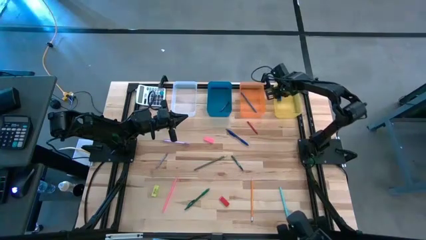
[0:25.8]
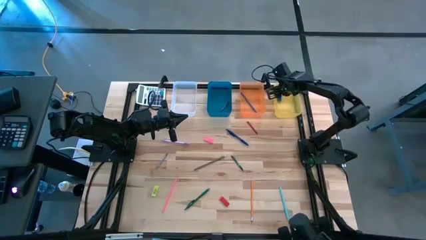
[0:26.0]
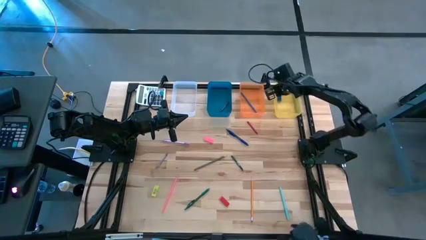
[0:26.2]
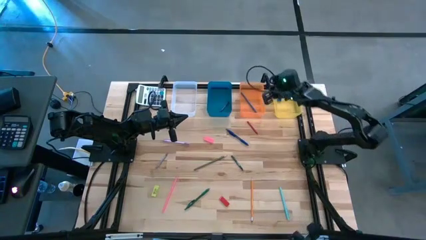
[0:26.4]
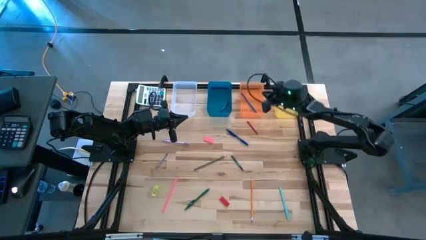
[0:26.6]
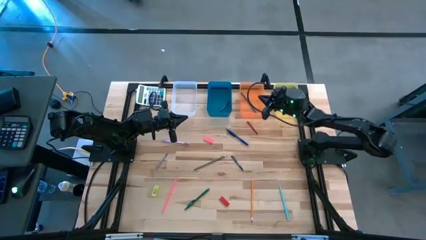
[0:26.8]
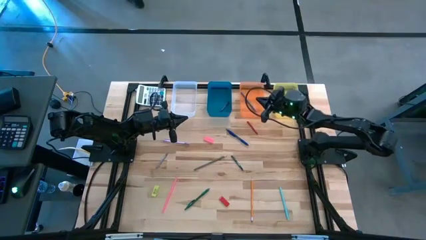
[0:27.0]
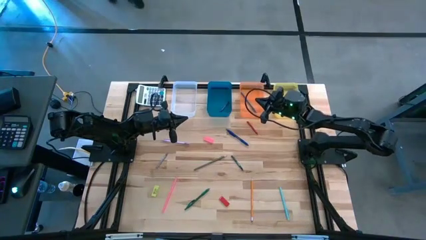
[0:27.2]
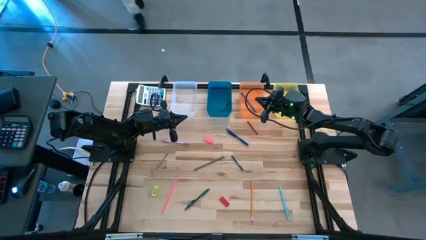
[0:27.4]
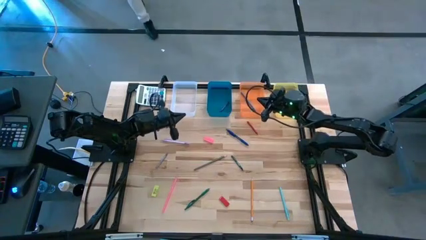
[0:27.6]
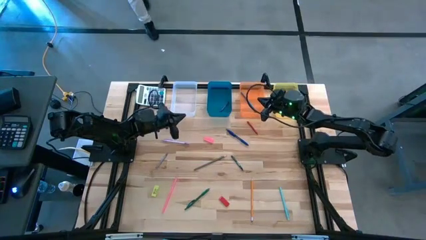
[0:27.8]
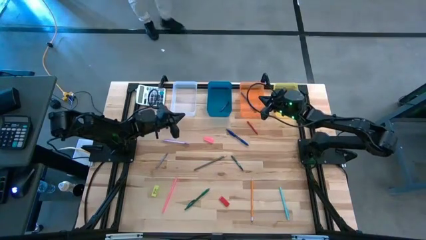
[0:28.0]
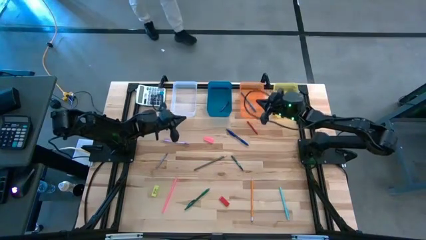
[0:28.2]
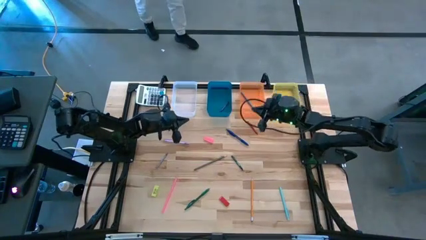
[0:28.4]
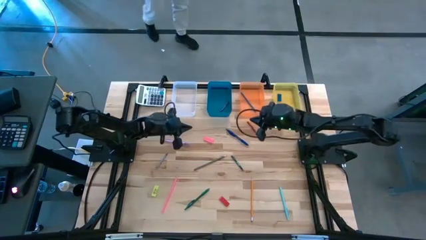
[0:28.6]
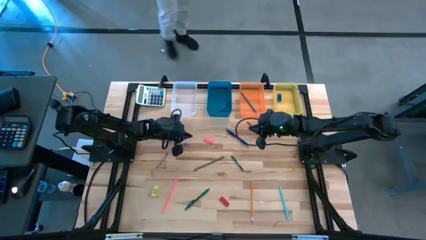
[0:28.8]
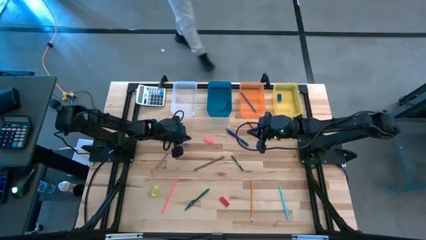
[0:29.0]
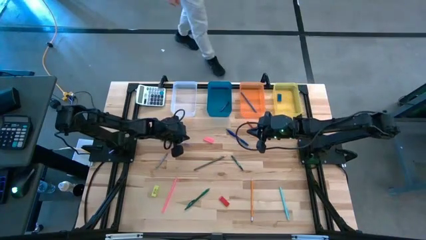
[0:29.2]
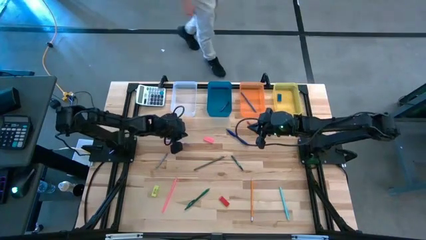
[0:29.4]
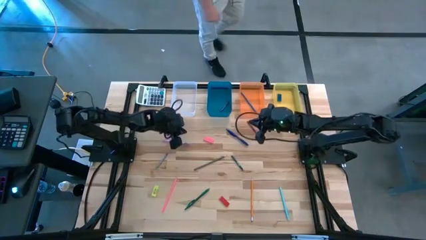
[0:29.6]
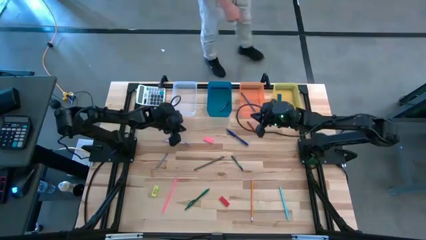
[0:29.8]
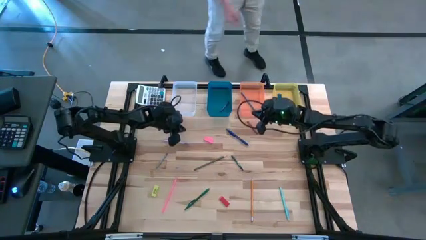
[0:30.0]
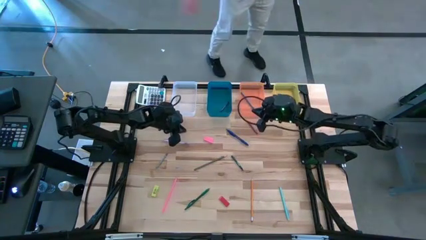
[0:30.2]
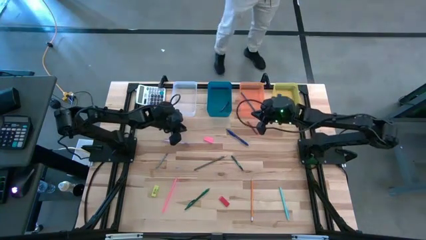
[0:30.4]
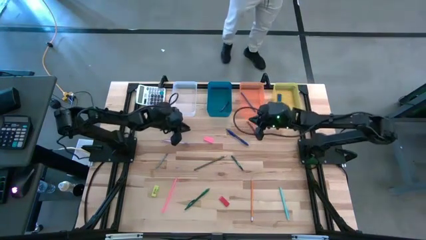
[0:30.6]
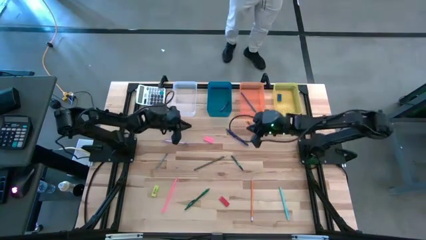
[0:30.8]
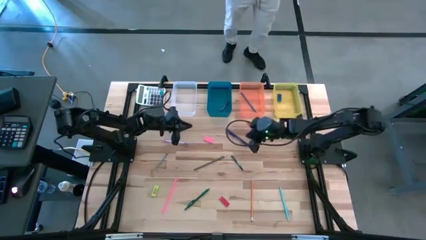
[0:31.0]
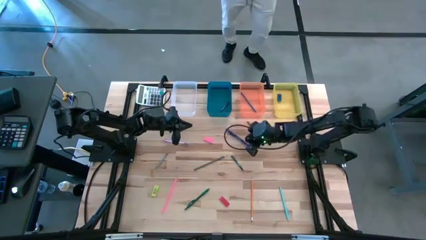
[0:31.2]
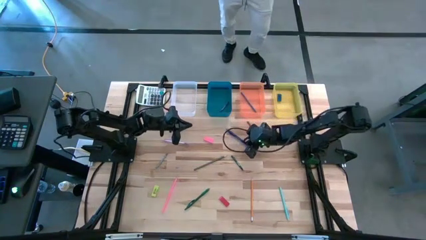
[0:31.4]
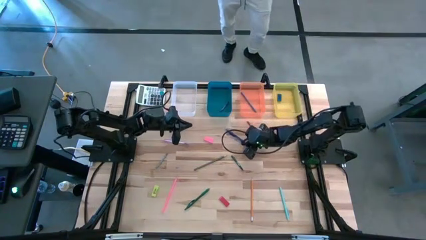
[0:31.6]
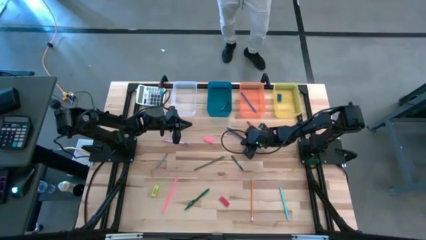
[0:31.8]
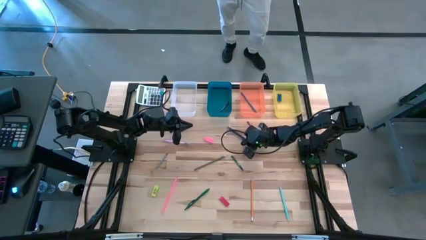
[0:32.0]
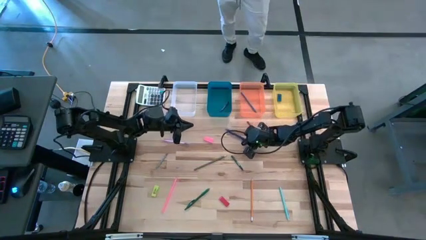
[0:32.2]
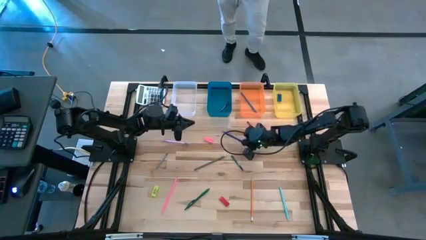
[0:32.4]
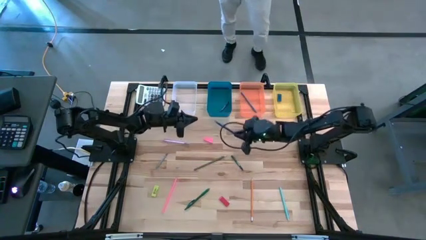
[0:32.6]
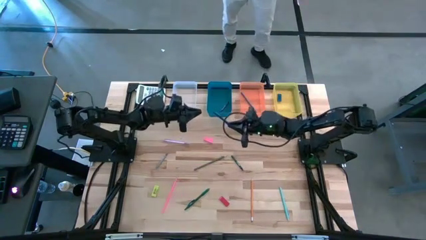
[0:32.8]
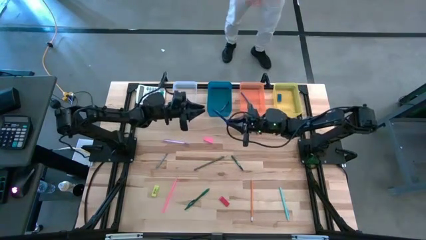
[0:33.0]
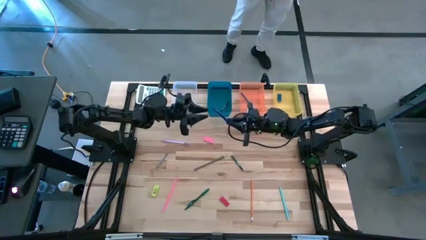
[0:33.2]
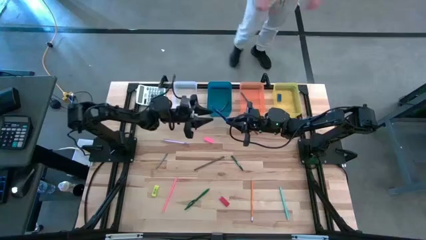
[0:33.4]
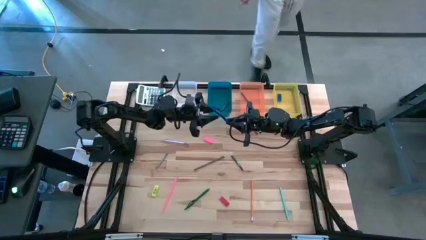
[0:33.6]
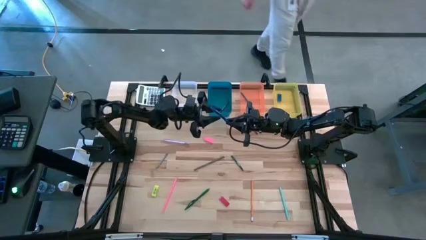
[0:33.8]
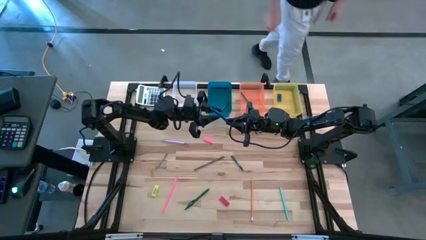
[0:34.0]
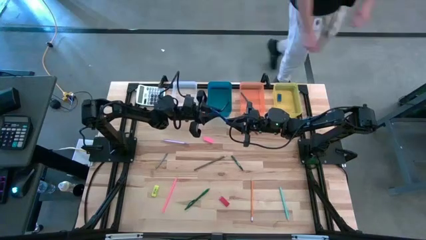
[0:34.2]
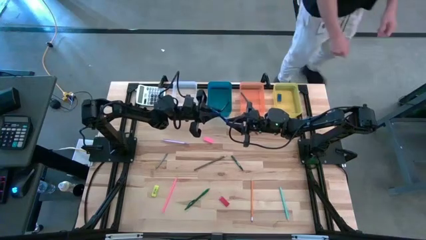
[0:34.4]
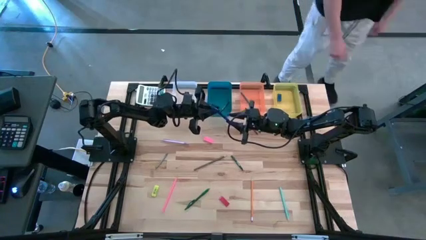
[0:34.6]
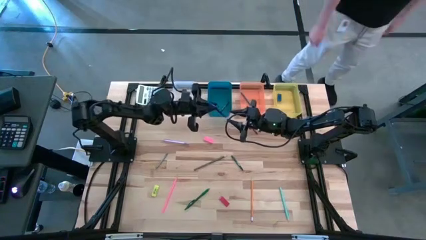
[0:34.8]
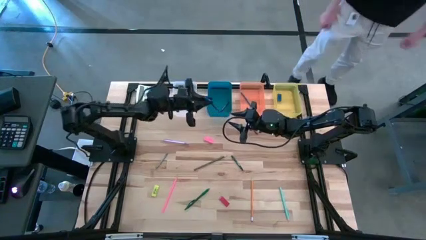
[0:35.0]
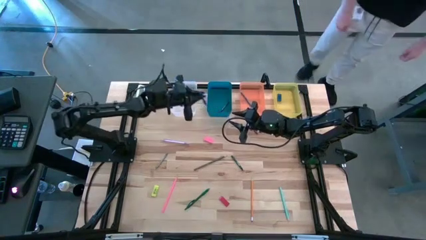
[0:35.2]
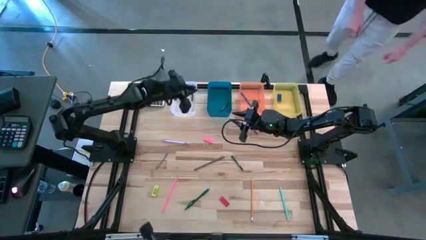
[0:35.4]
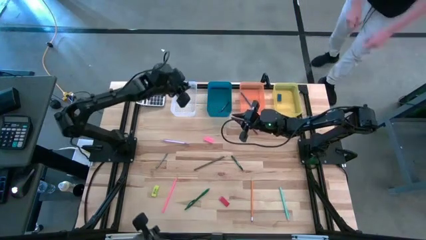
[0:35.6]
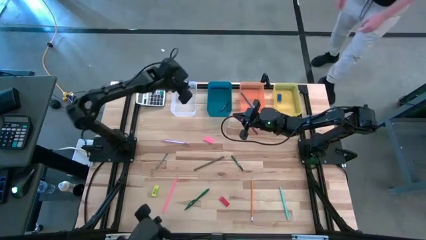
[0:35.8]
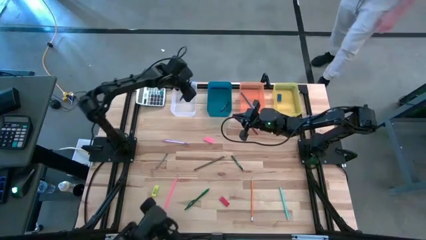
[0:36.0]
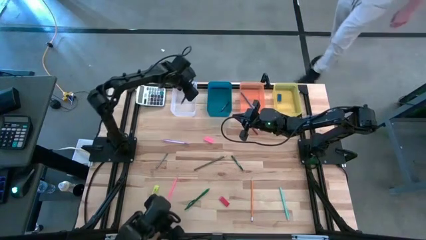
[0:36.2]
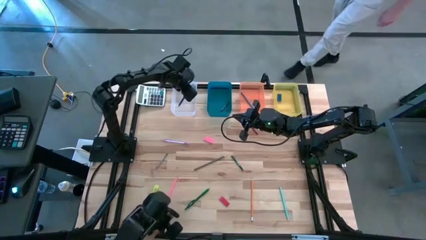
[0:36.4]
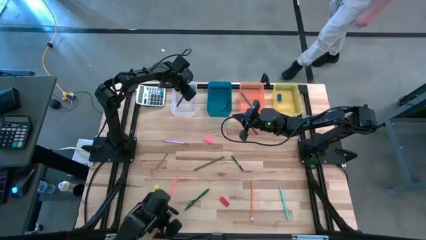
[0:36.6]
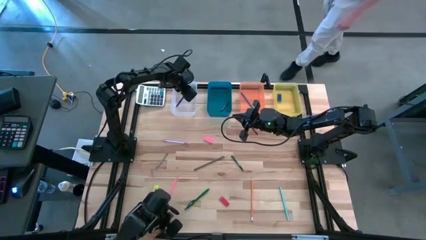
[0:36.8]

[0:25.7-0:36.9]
Task: Sort crayons/erasers/pens/pencils in bins
Put the blue pen into the transparent bin

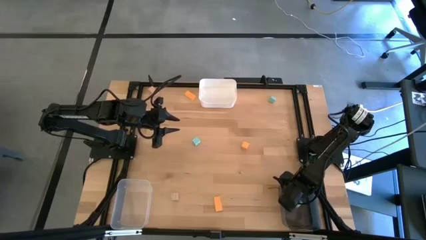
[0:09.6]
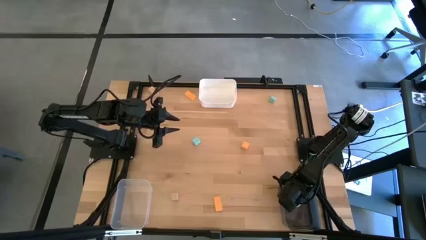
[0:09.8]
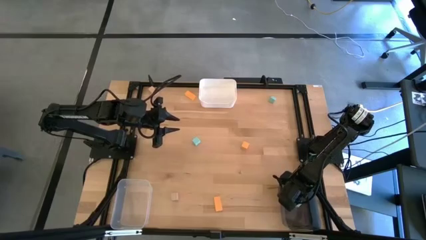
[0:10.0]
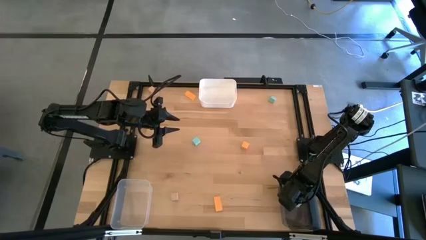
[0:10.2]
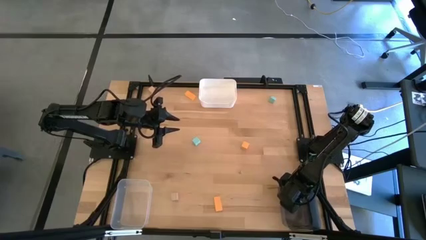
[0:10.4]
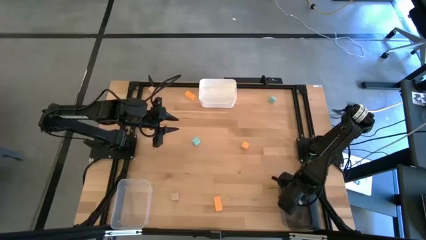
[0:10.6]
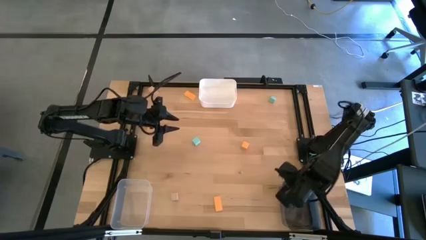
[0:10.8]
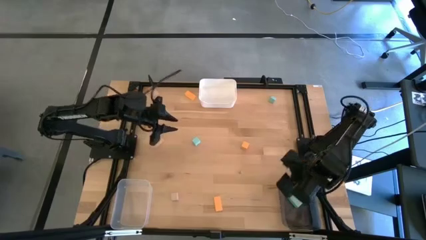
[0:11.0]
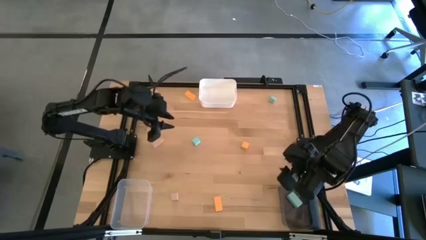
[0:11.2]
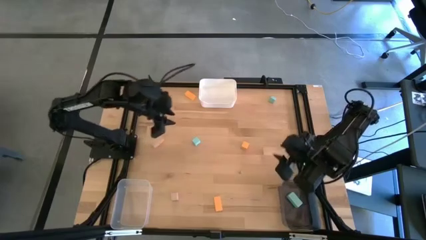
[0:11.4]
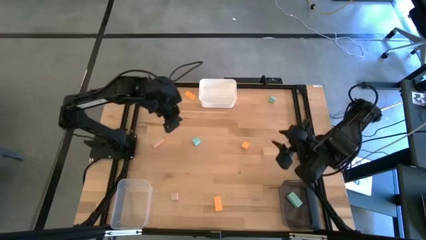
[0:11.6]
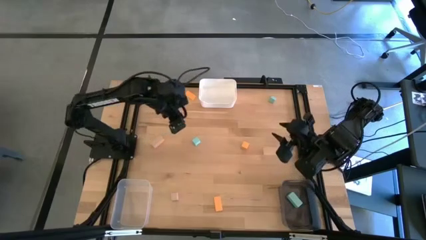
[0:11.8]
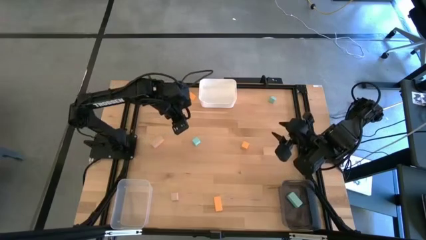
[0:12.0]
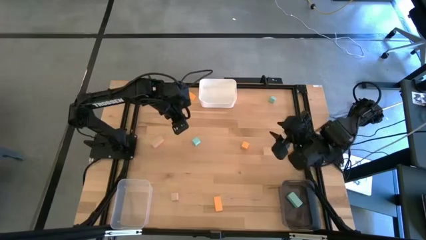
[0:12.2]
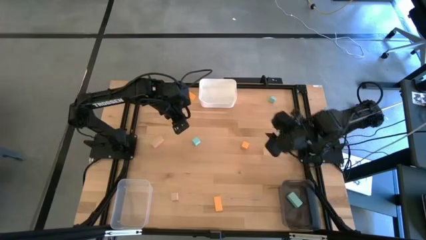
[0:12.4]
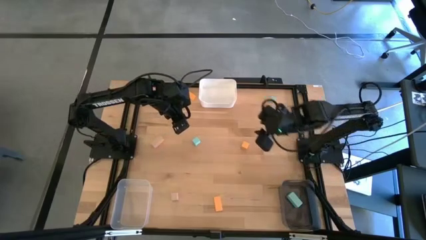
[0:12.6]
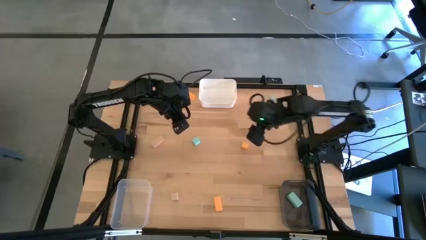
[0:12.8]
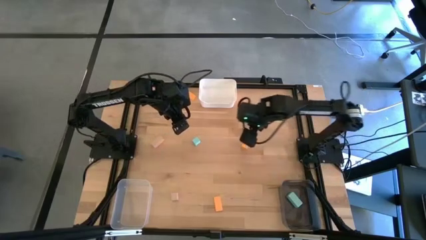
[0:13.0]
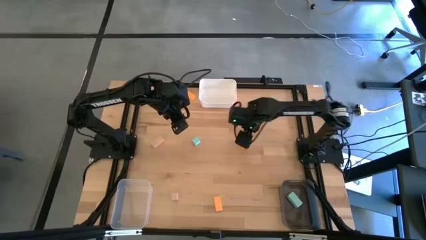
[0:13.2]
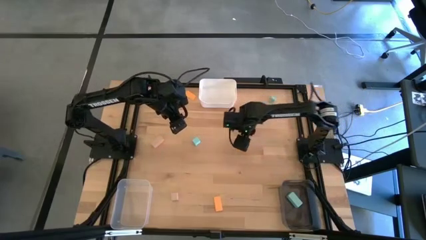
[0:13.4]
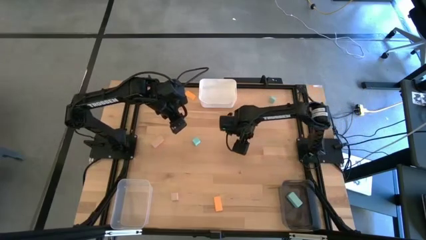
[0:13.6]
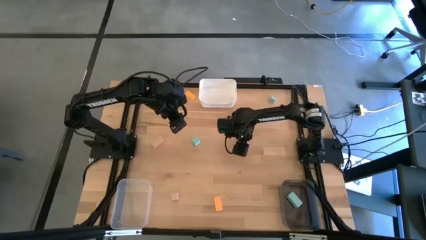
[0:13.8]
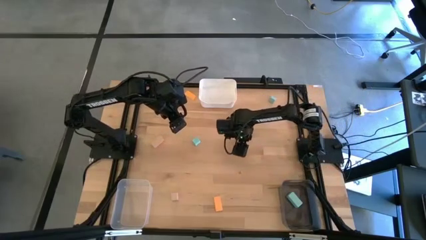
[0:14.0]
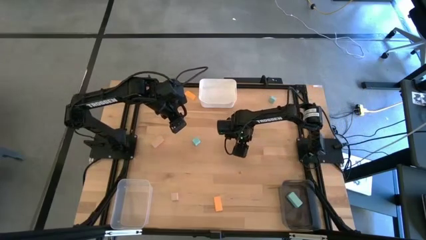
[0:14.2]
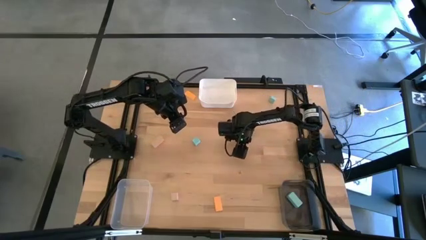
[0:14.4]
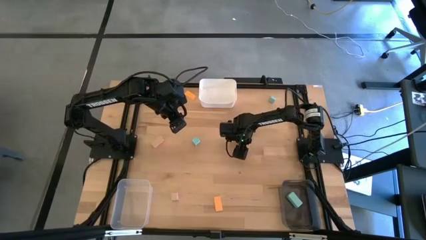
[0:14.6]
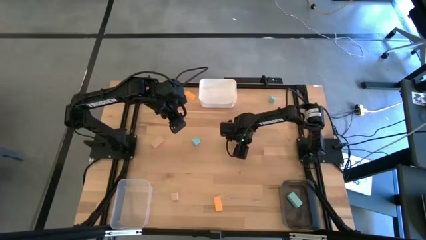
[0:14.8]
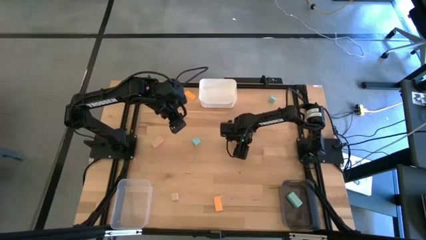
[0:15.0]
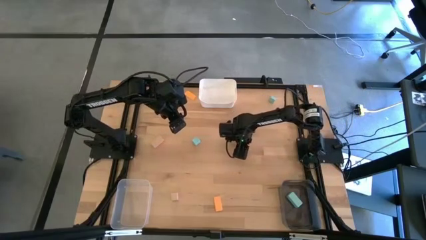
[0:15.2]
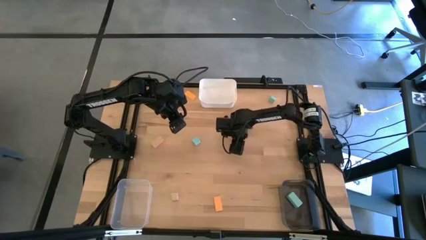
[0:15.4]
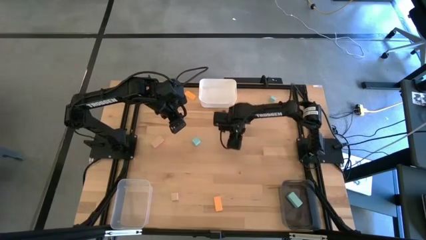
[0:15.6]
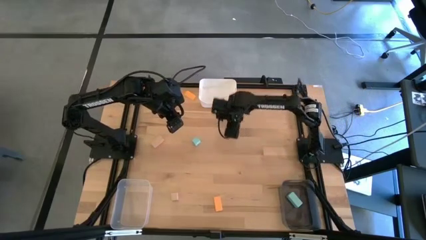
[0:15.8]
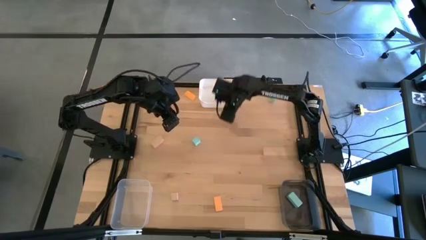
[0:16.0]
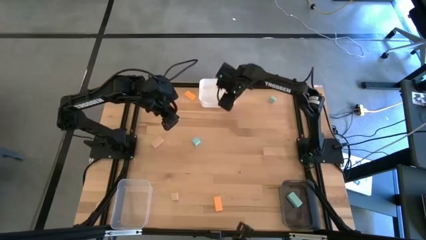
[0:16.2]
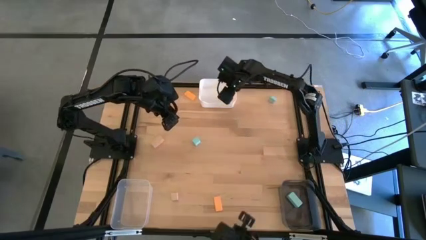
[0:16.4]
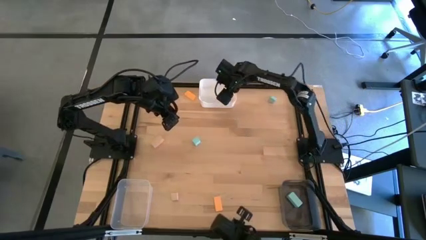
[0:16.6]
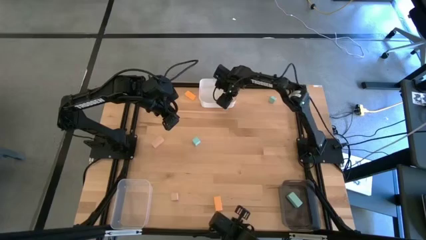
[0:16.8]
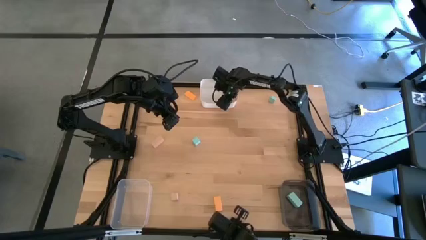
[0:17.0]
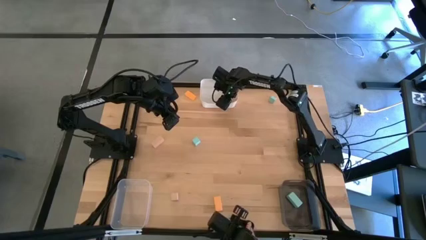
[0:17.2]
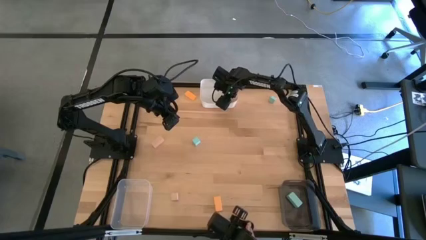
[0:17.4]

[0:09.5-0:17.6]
Task: Sort & place blocks by color
Put the middle left orange block into the white bin
